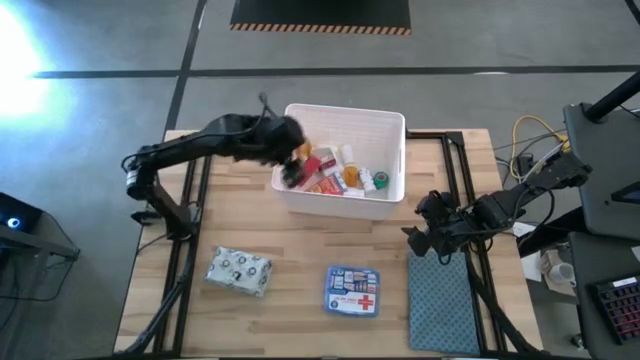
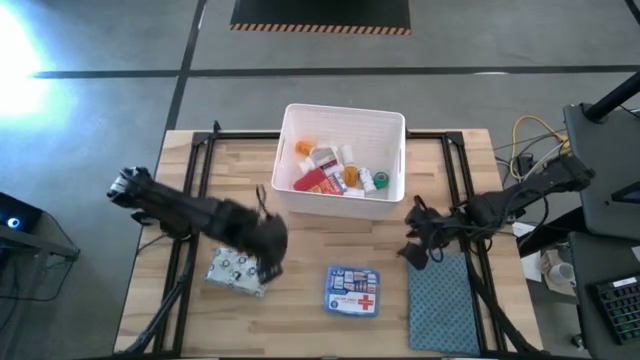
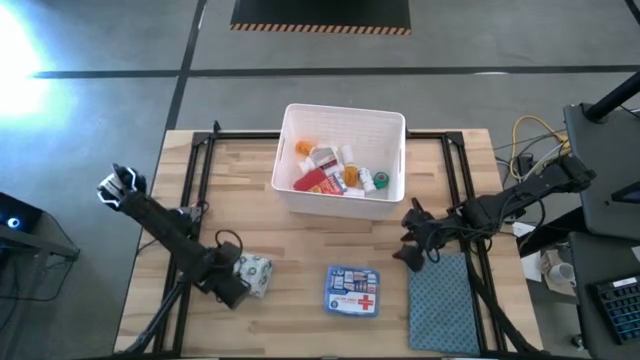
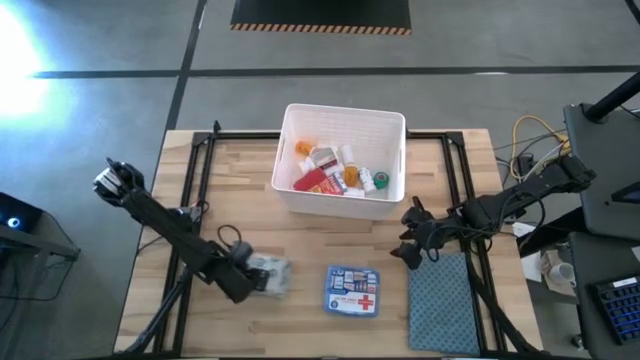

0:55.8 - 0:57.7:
Task: Pick & place medical supplies in basket/bin
Move the mailer bag to the center of the table

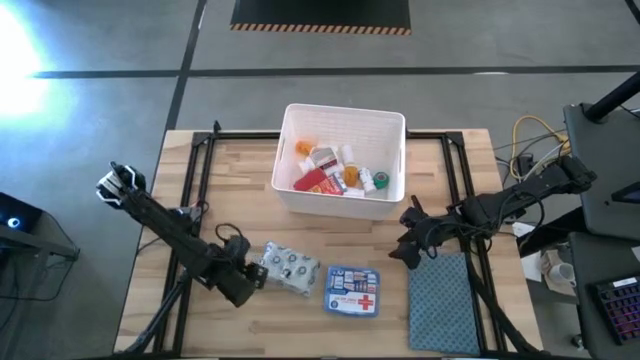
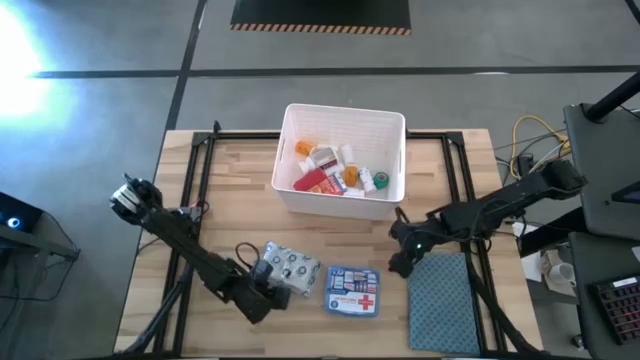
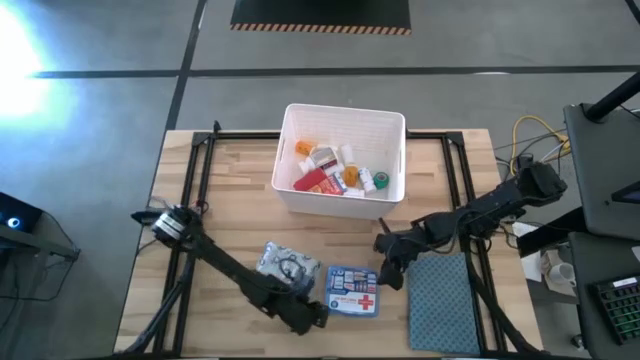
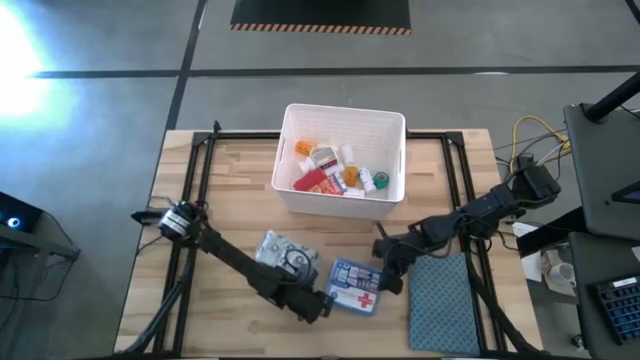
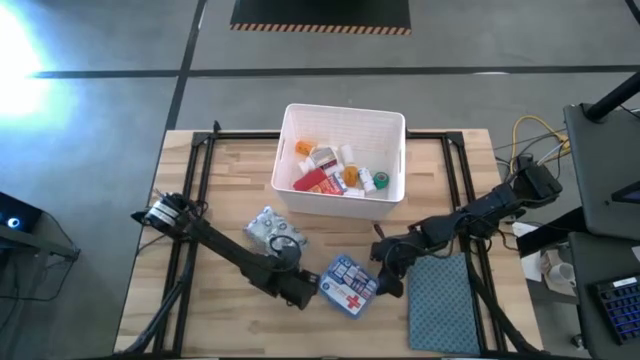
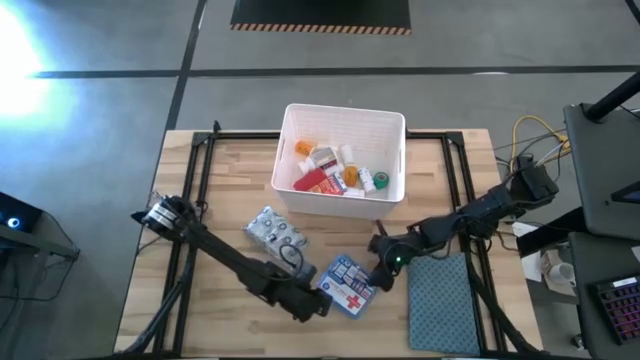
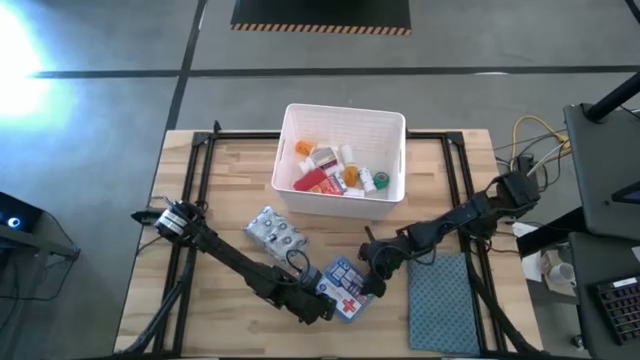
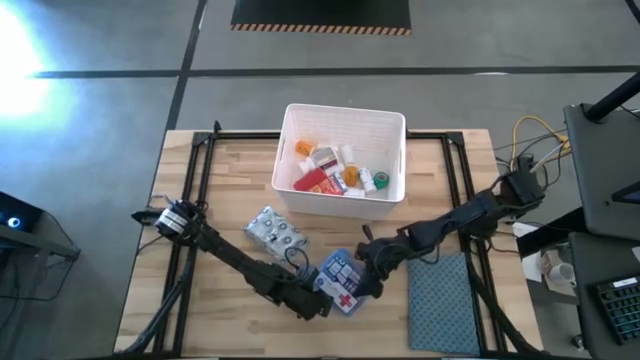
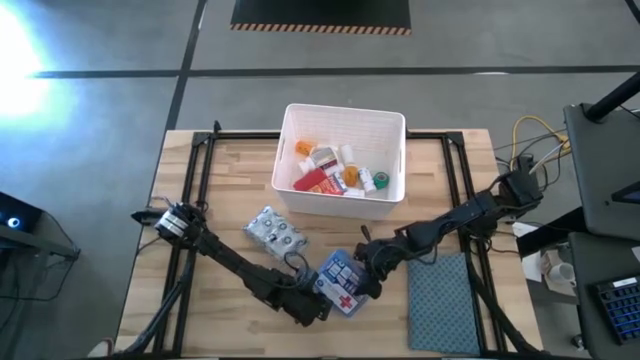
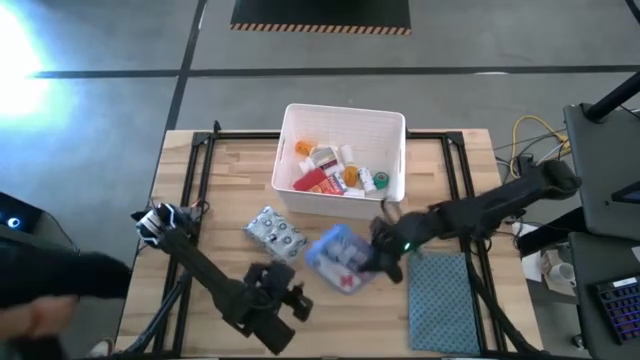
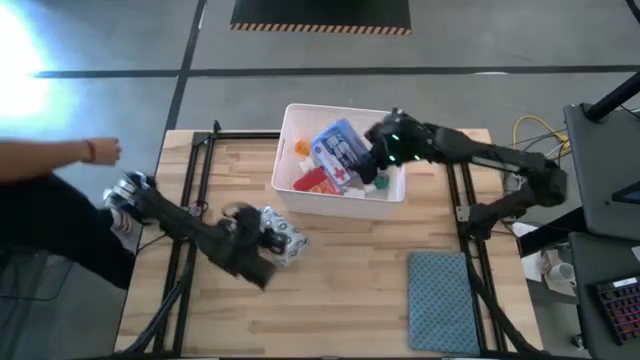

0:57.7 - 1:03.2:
Put the first aid kit into the white bin

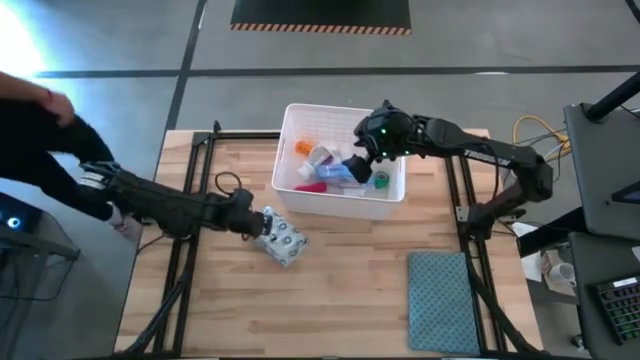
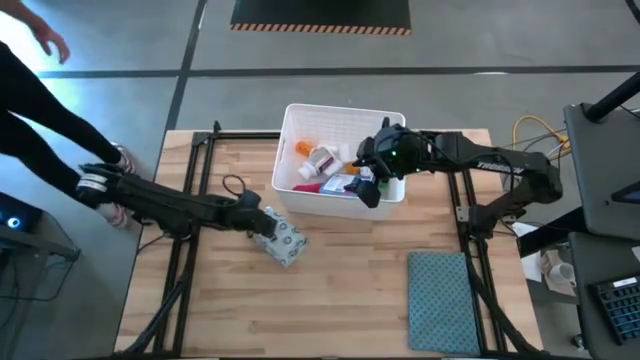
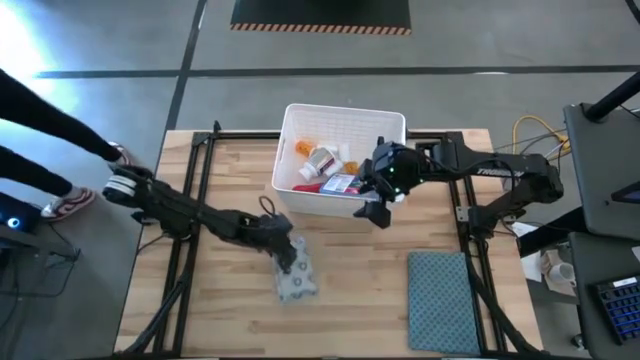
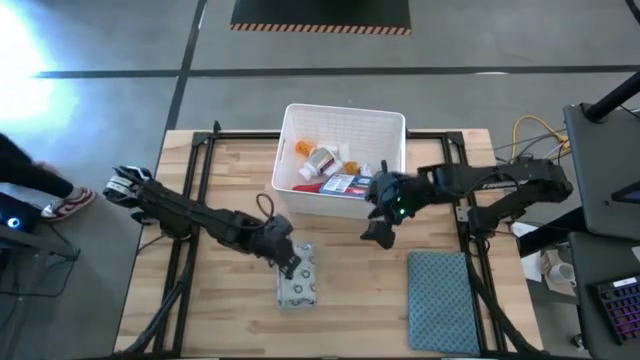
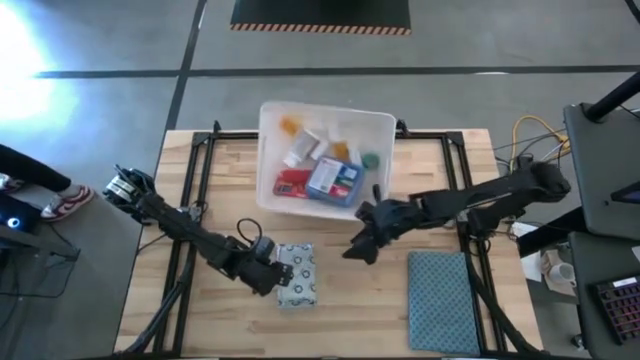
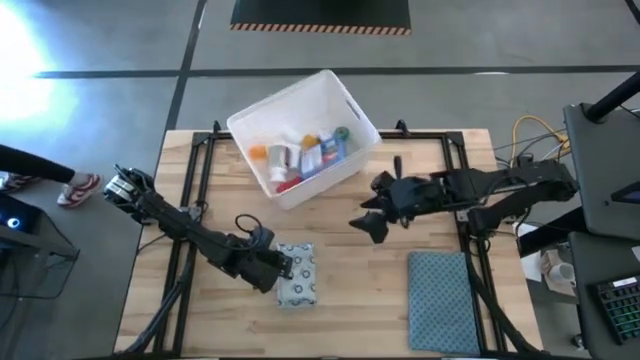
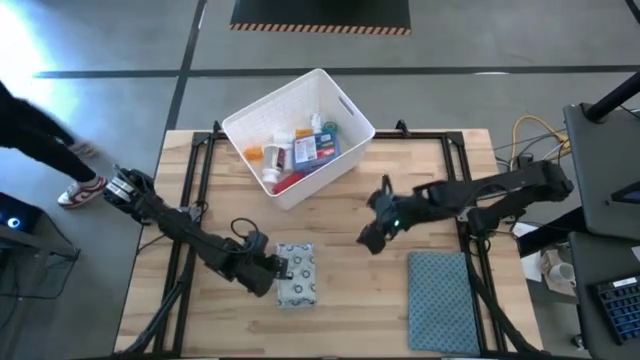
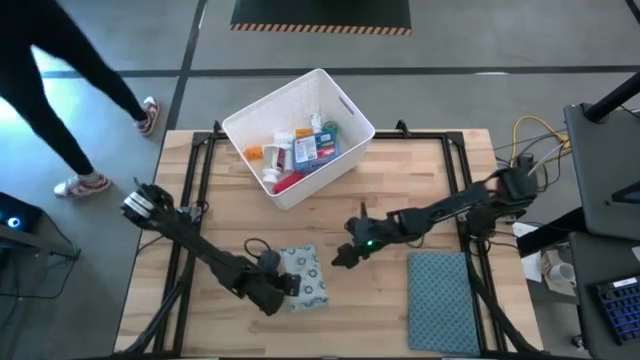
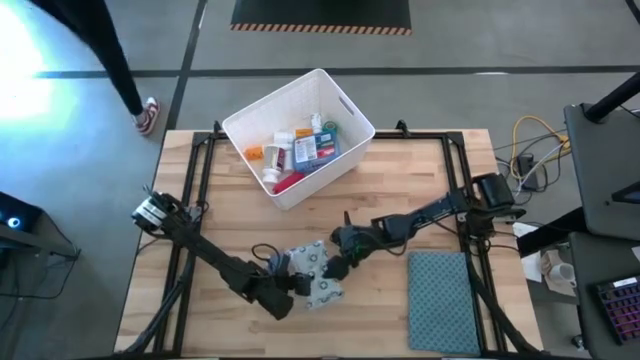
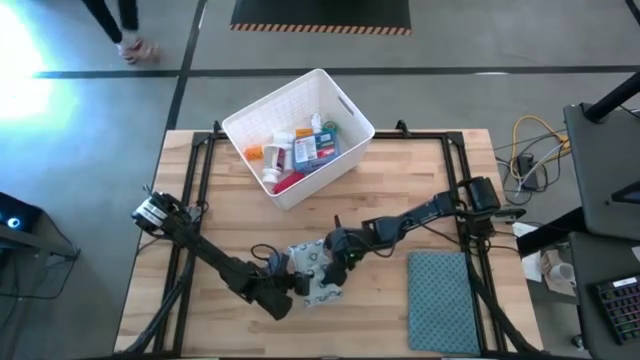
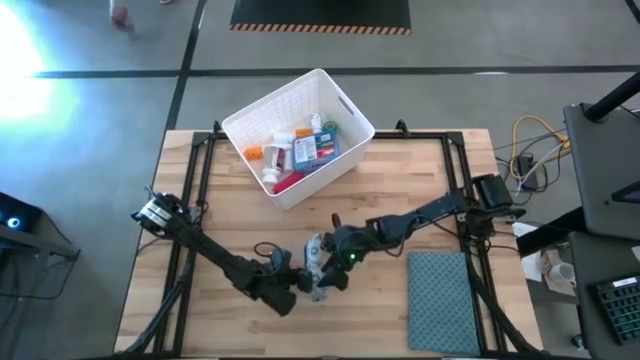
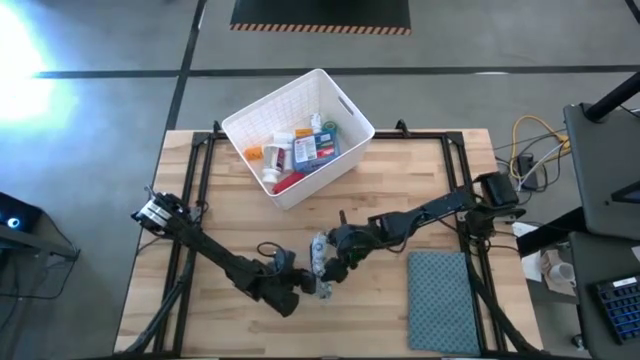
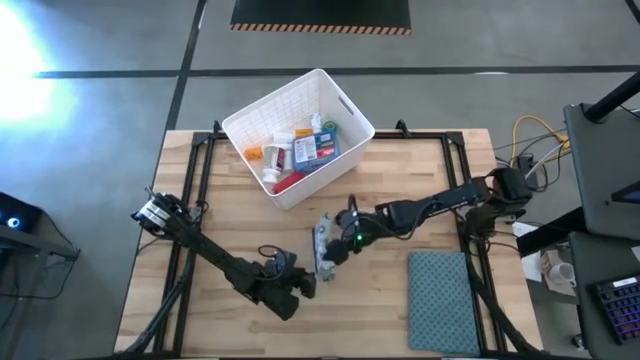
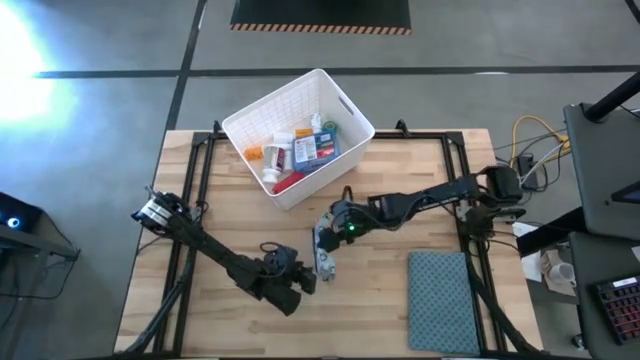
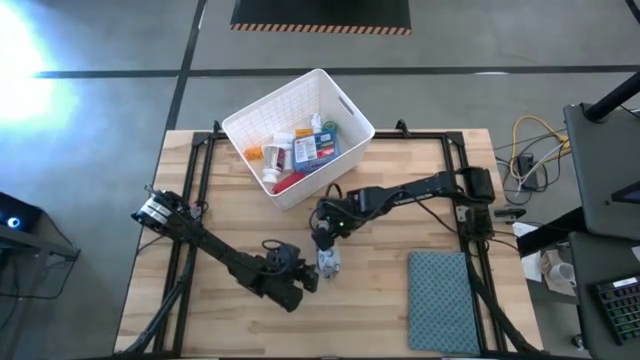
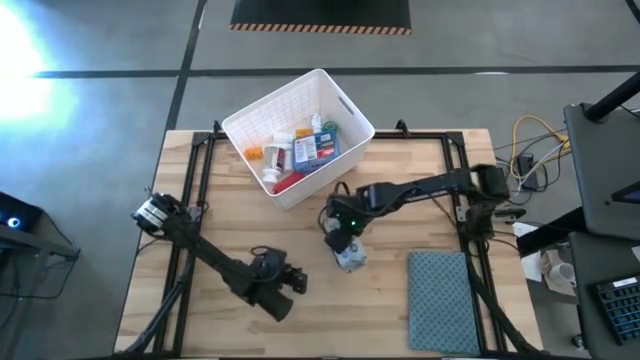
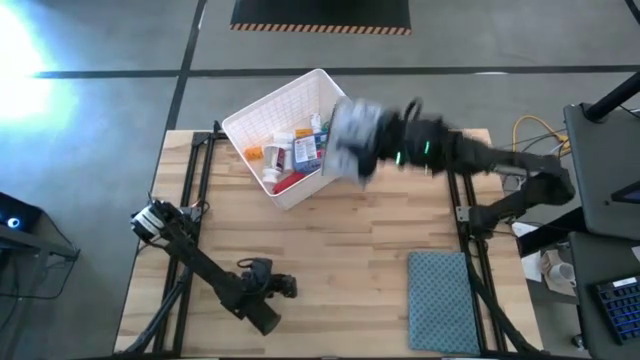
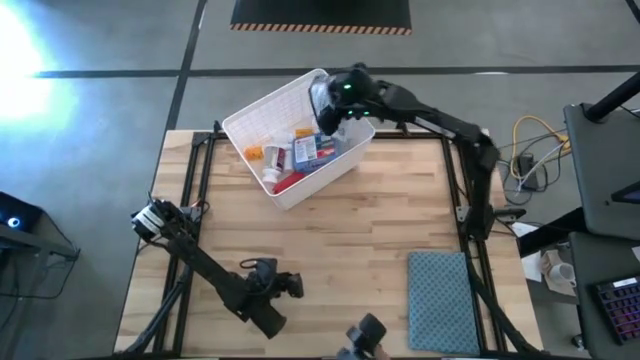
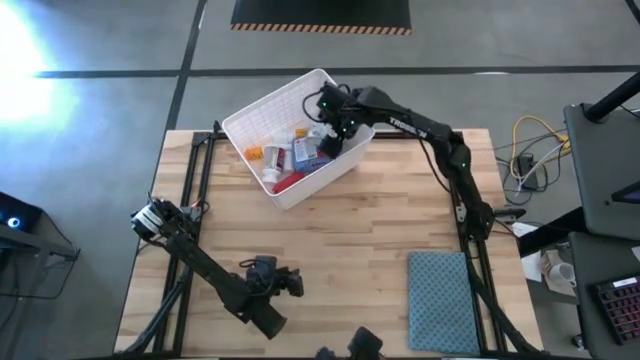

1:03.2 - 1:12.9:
Put the mailer bag into the white bin

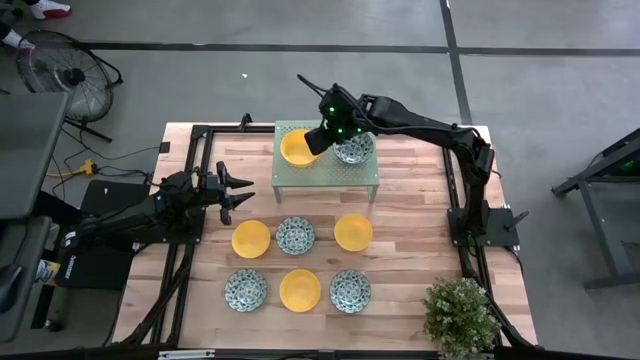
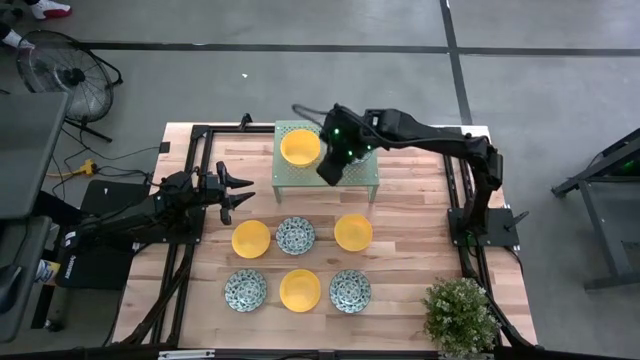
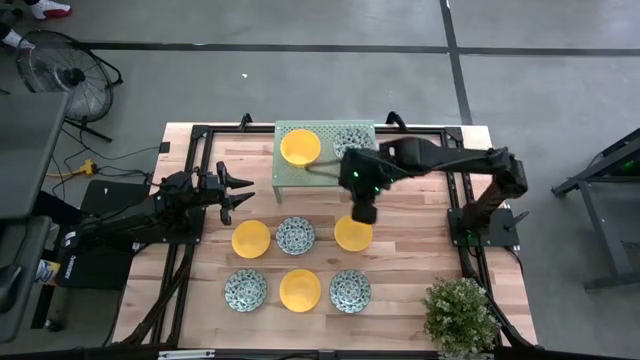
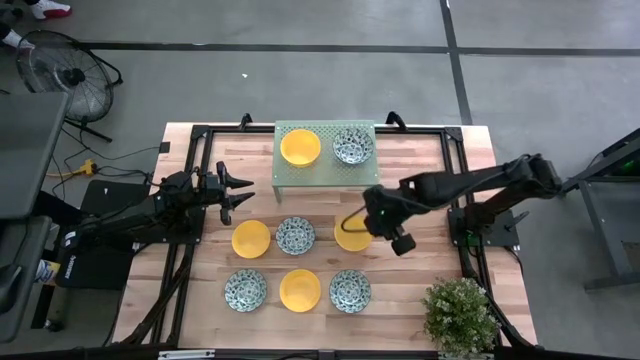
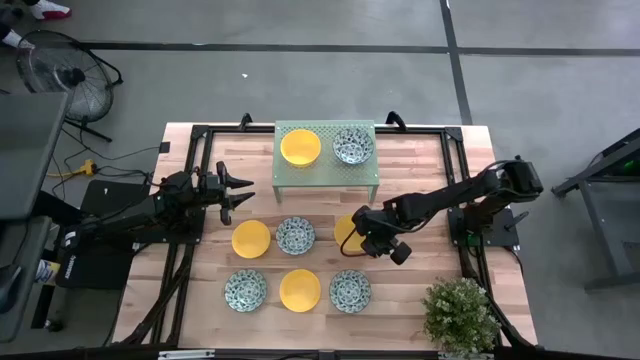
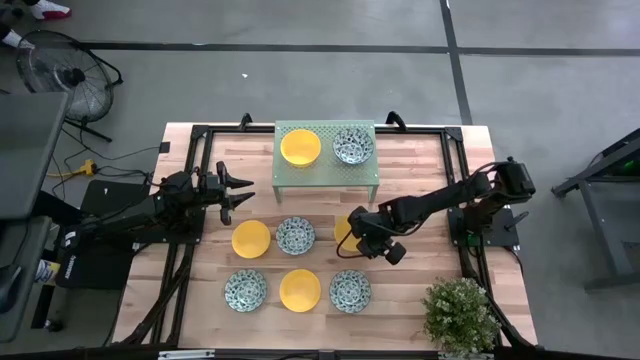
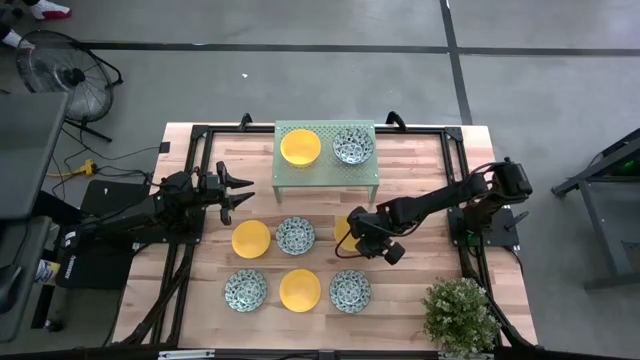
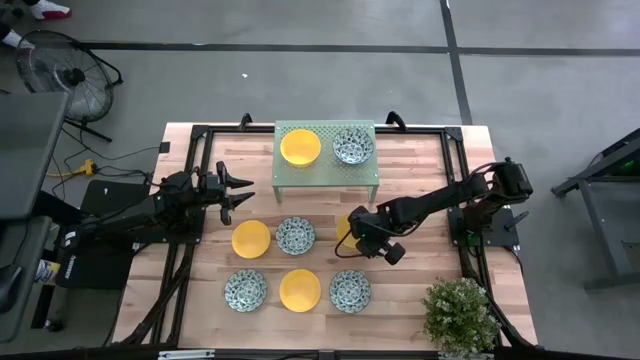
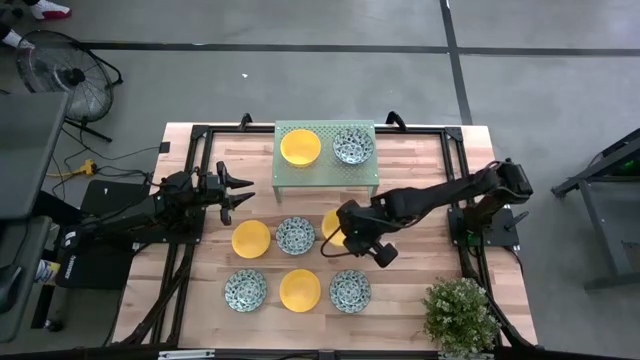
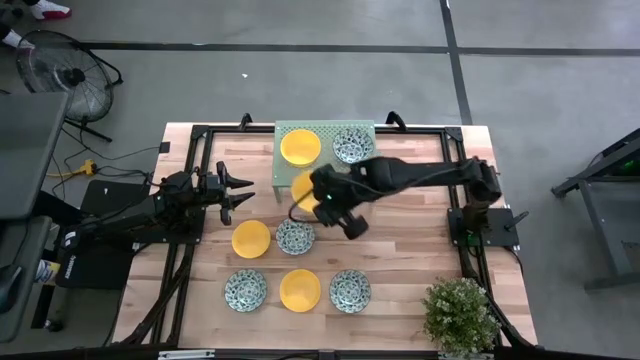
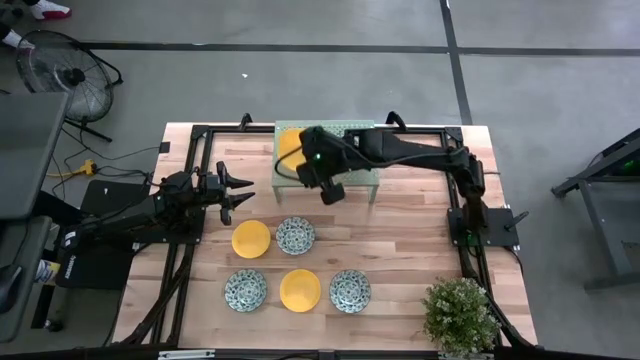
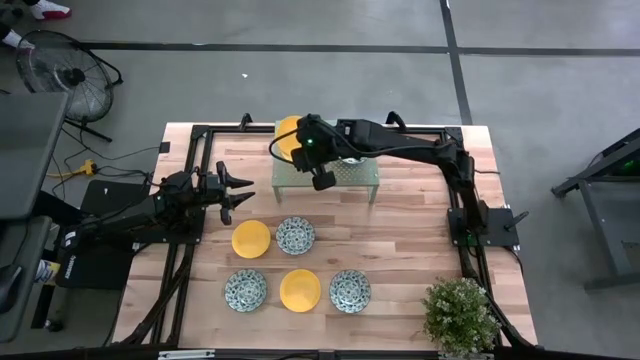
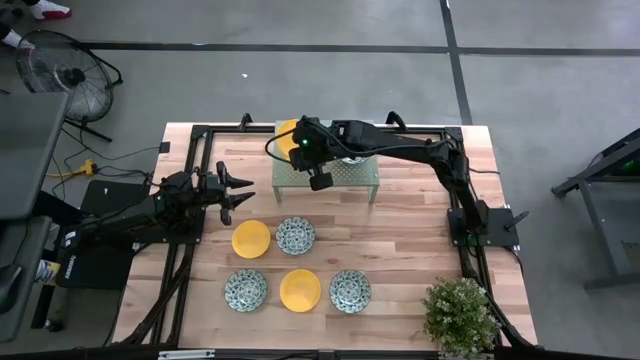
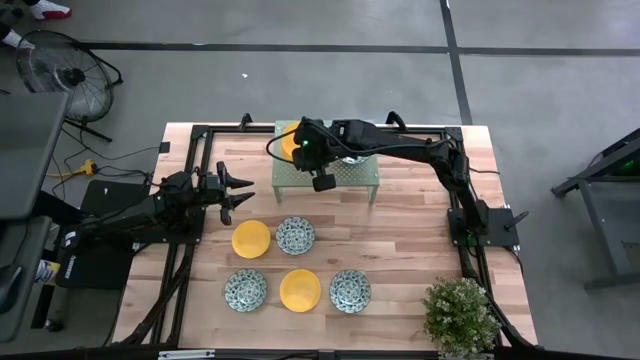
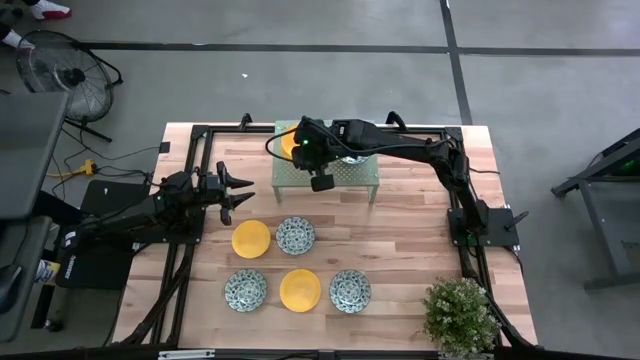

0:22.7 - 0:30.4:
Task: Pick & Place Mini bowls
Stack the yellow bowl on the yellow bowl on the shelf
